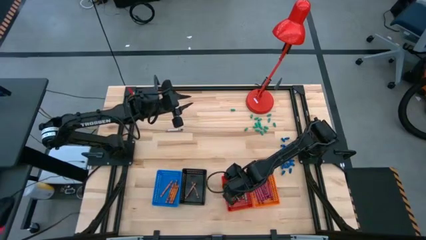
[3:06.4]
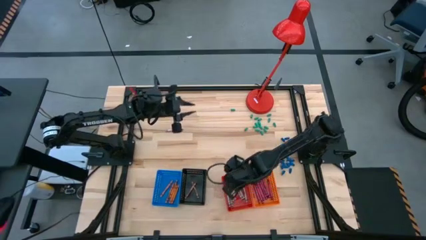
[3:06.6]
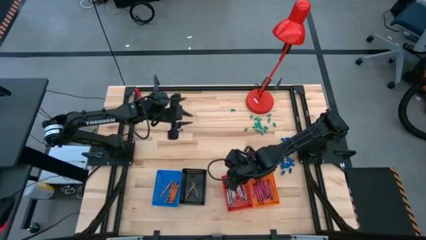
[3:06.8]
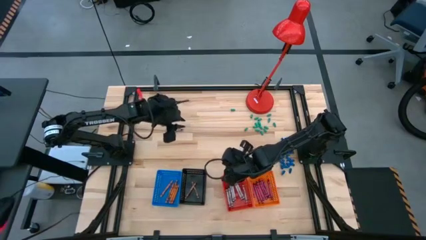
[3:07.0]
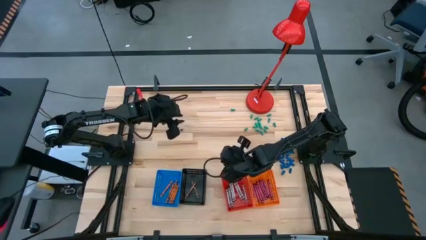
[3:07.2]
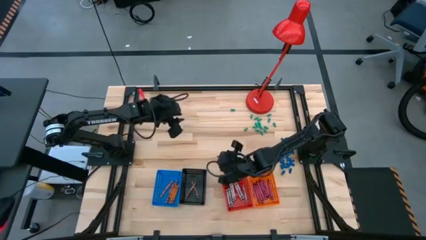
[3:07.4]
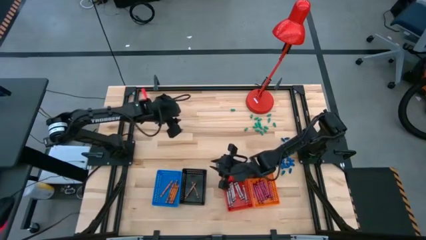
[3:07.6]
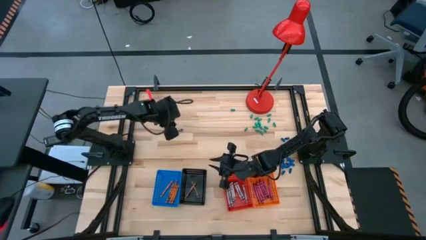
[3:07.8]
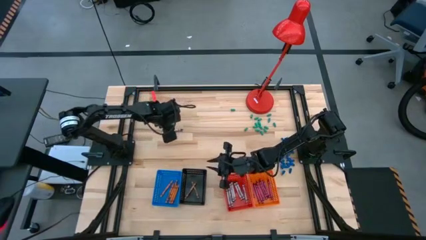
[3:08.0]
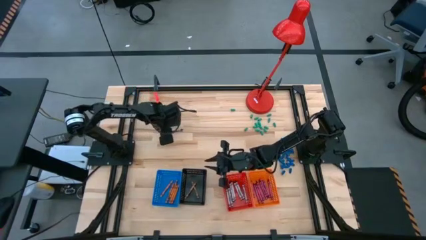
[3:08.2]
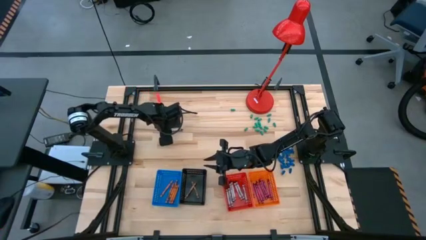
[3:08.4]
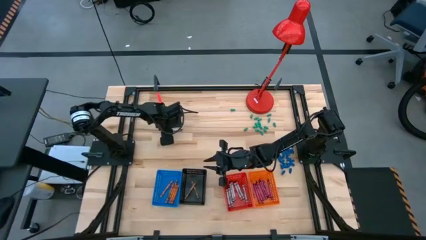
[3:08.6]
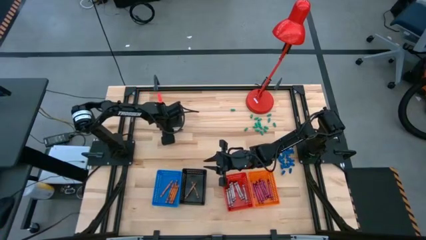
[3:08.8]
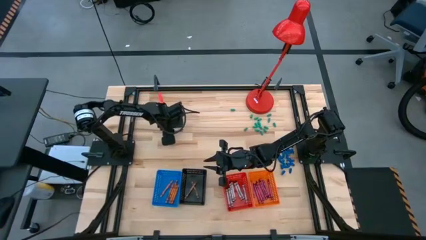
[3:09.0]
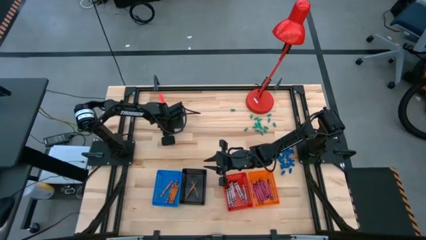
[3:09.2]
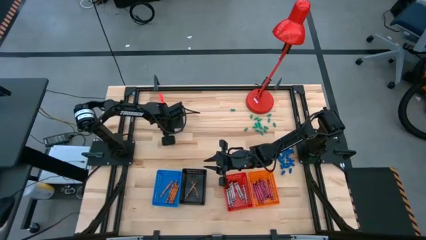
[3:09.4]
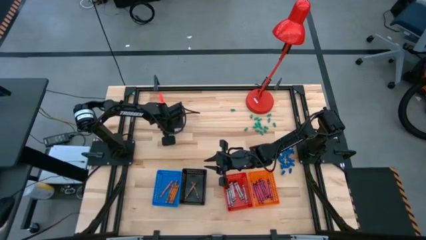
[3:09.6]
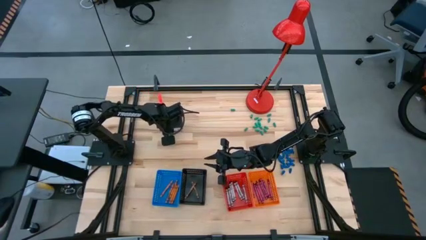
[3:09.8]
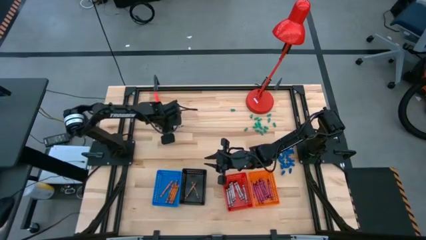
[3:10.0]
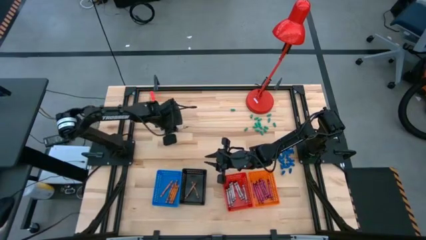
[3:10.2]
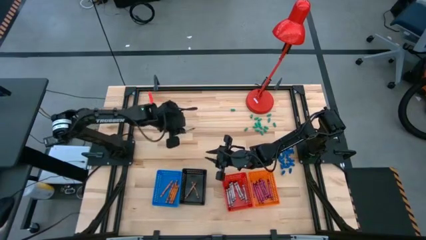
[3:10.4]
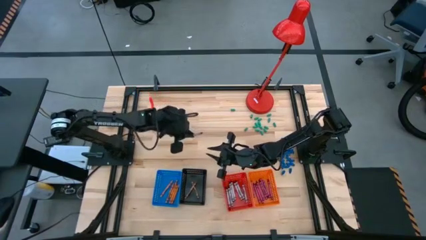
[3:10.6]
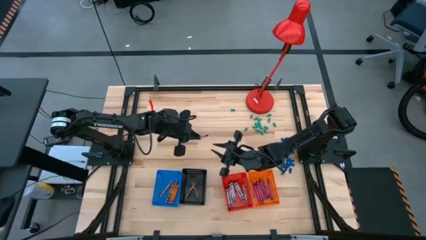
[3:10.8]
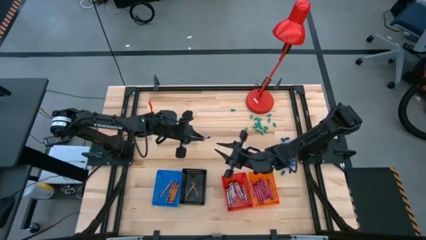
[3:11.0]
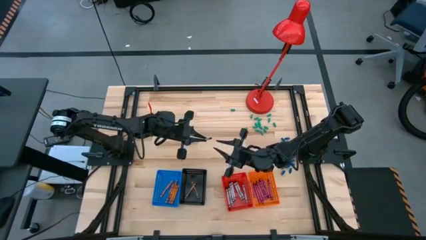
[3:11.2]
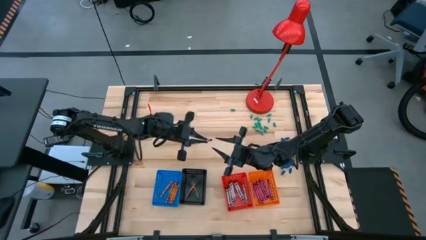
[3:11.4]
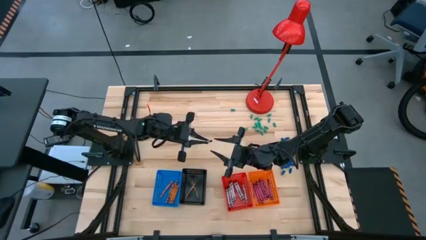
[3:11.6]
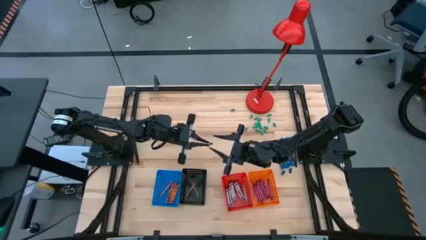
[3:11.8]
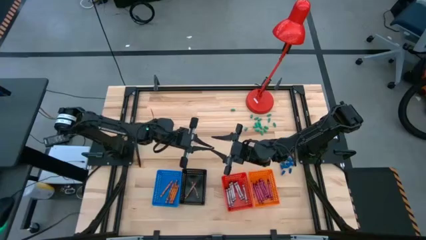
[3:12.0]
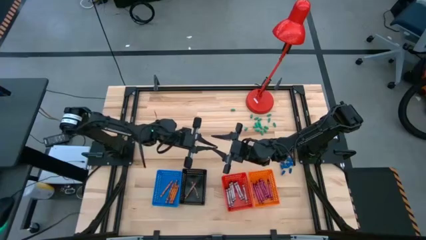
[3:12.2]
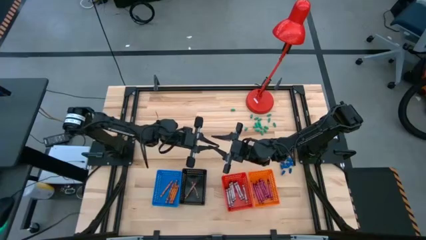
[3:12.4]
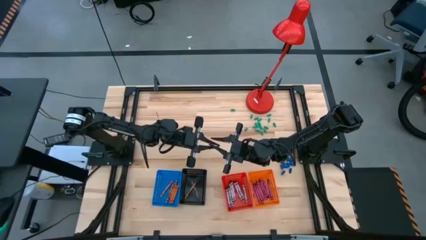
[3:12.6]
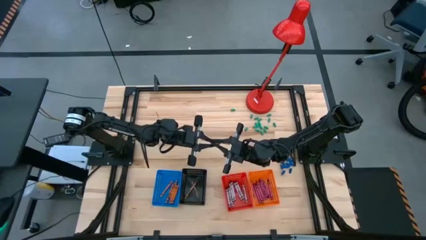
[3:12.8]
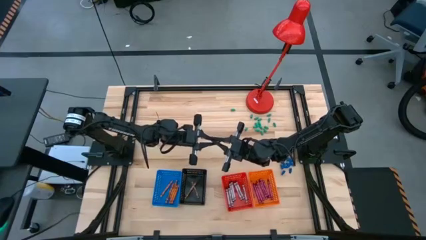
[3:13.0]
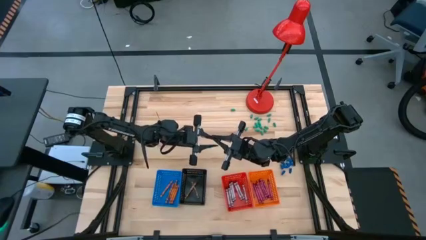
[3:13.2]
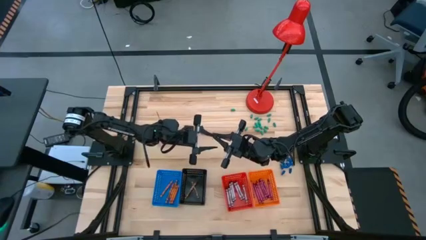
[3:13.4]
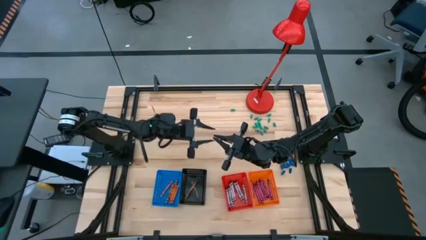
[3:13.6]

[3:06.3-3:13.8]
Task: Sort crayons
Put the black crayon into the red basket

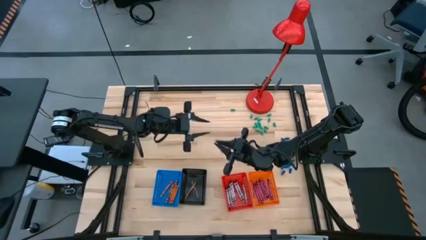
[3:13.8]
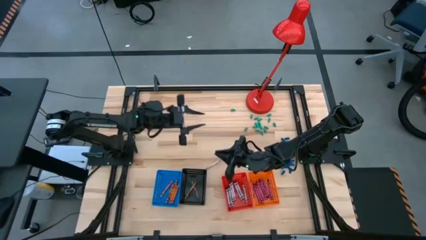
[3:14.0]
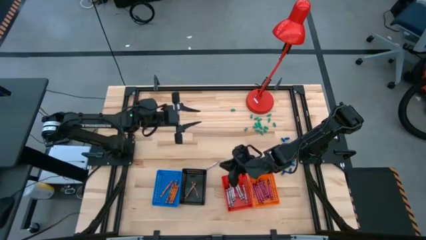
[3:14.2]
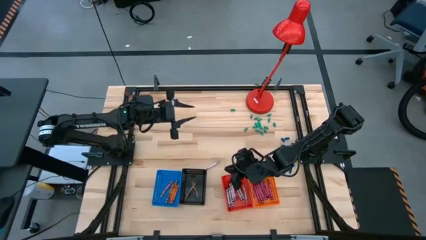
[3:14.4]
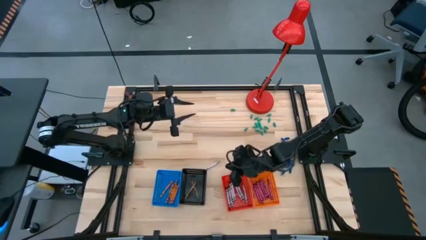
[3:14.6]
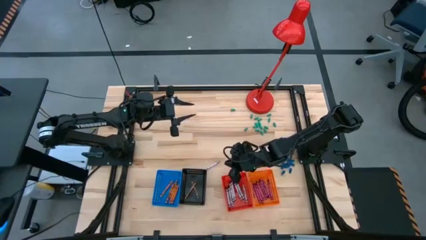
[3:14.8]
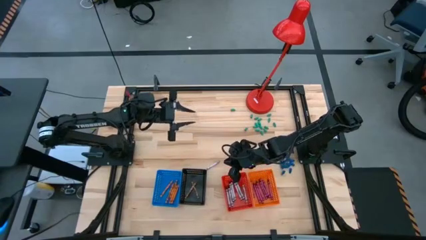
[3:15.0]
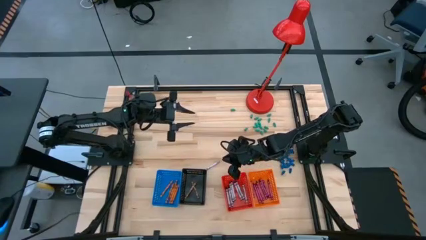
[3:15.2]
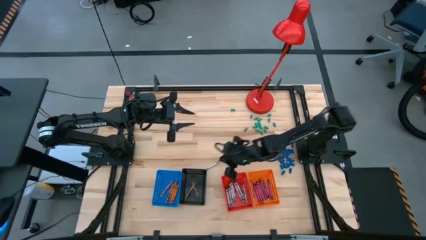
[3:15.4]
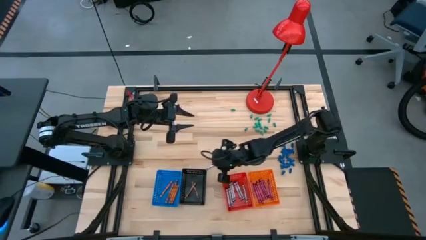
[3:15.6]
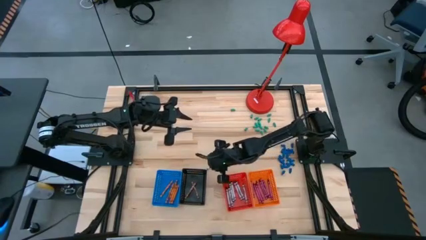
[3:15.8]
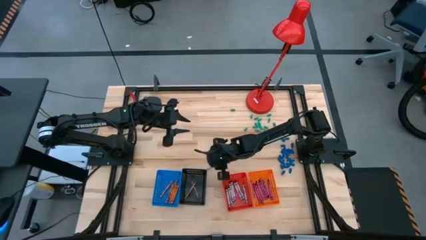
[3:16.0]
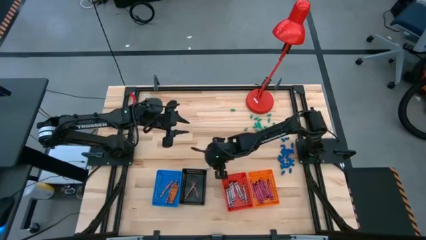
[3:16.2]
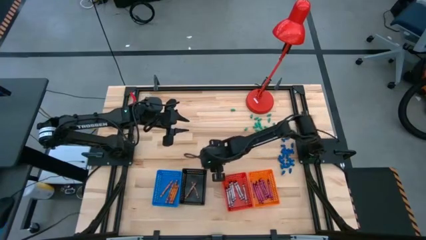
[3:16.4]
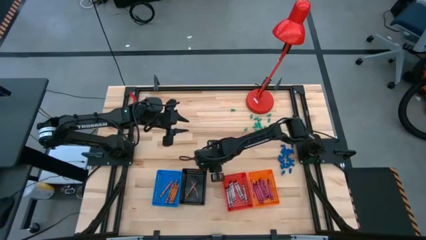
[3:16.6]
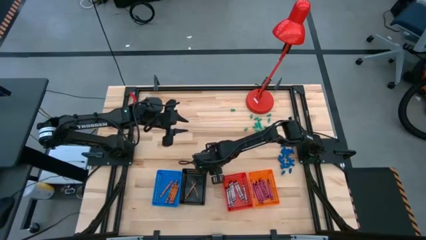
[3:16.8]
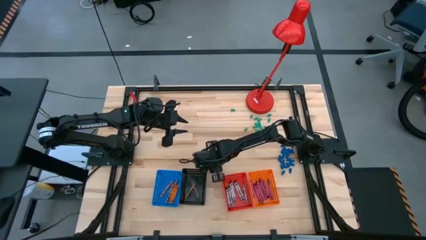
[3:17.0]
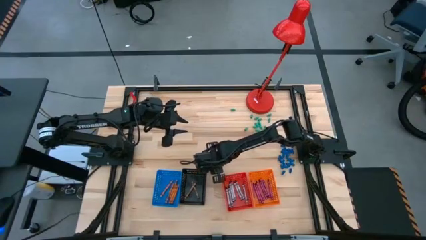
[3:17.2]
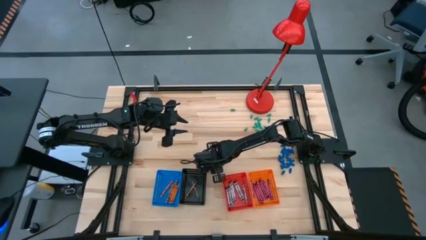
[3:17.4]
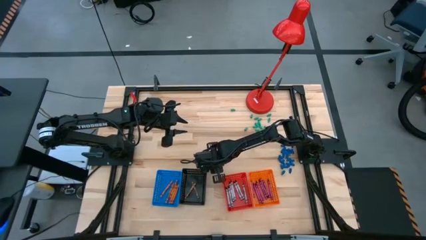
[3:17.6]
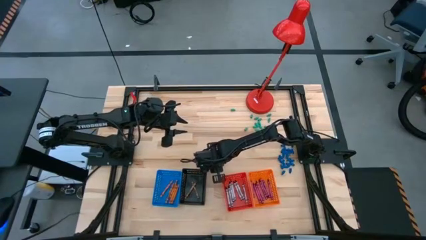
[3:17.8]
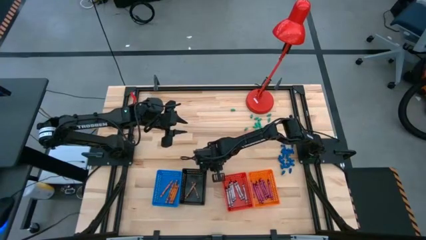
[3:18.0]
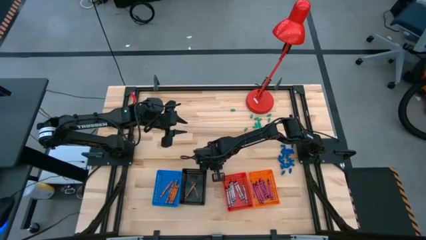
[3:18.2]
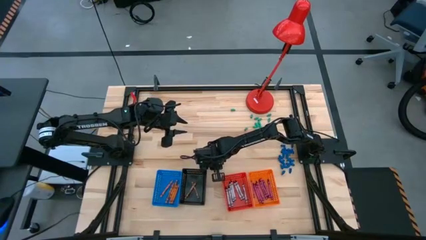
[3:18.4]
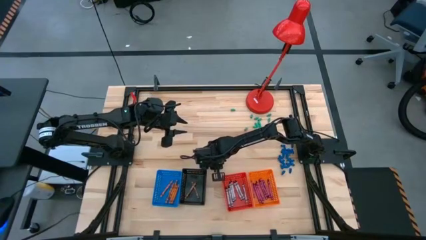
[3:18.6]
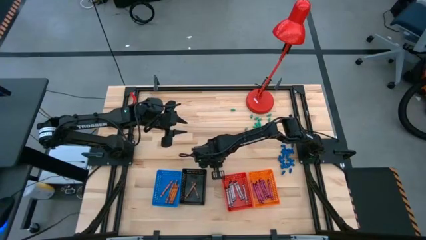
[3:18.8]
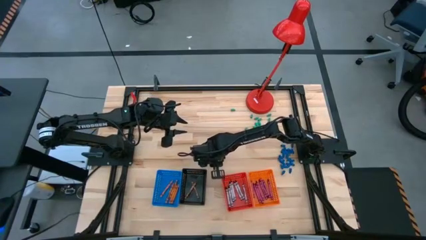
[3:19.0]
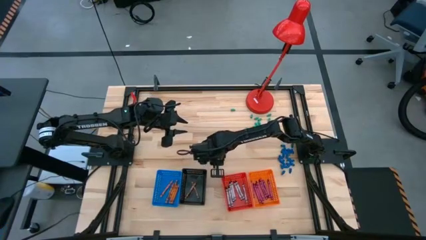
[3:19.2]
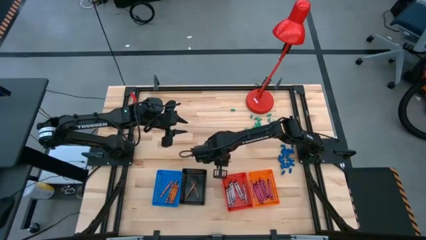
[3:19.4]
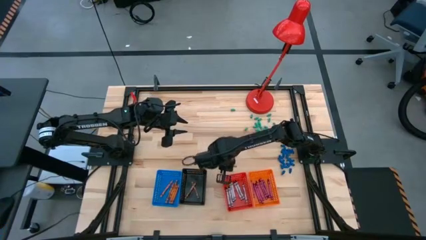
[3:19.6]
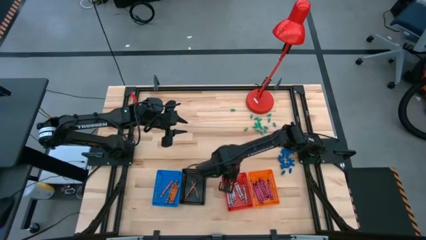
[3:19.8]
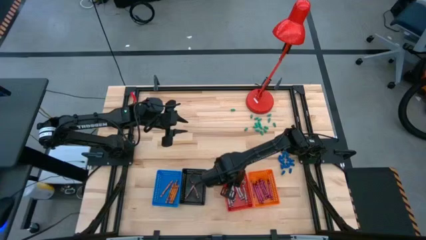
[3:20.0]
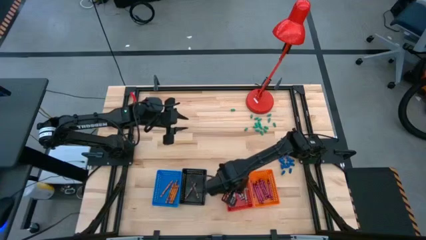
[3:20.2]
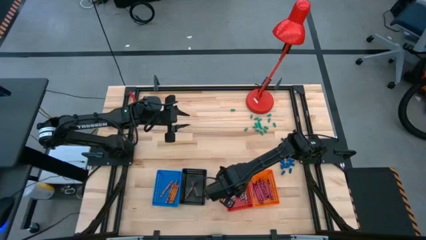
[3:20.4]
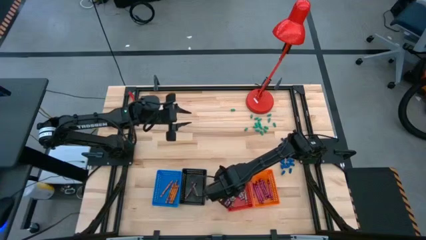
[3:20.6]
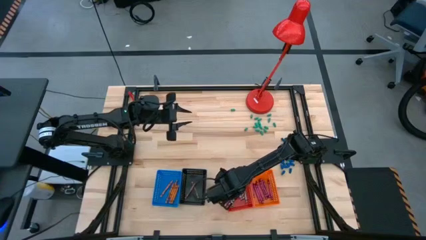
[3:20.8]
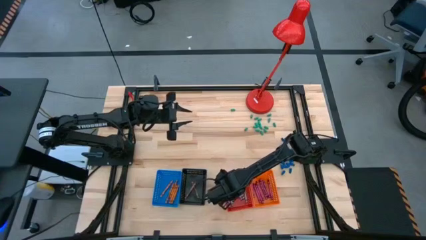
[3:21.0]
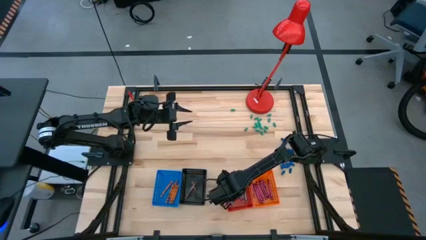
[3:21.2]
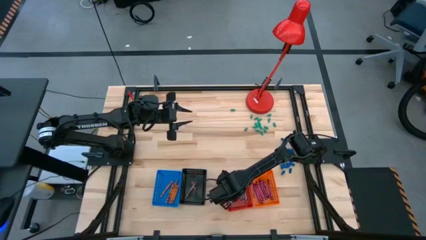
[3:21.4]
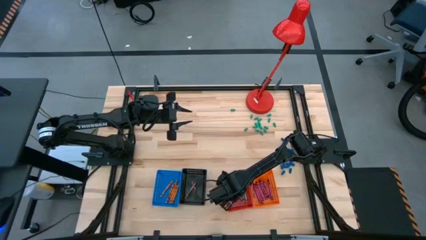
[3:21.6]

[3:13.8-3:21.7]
Put the black crayon into the red basket
